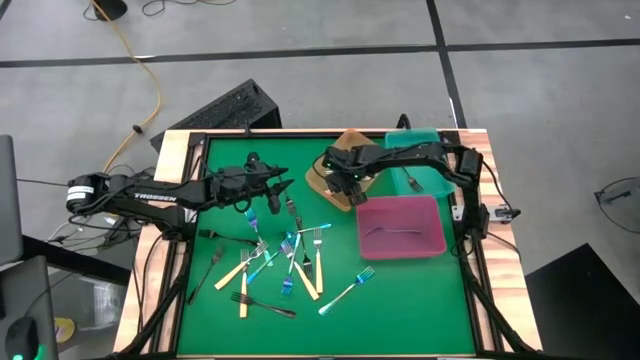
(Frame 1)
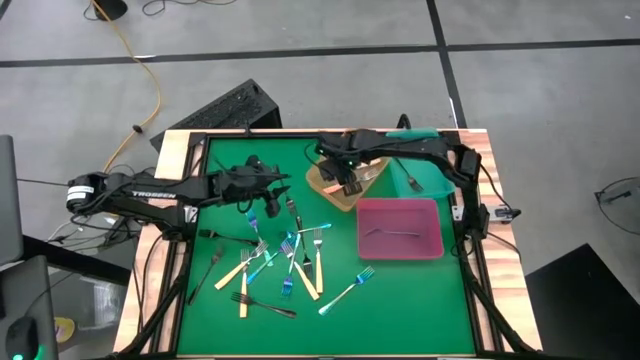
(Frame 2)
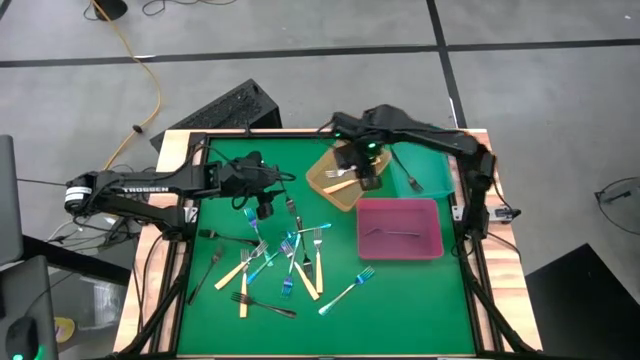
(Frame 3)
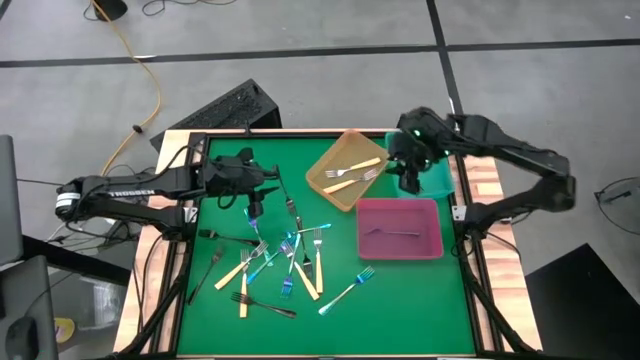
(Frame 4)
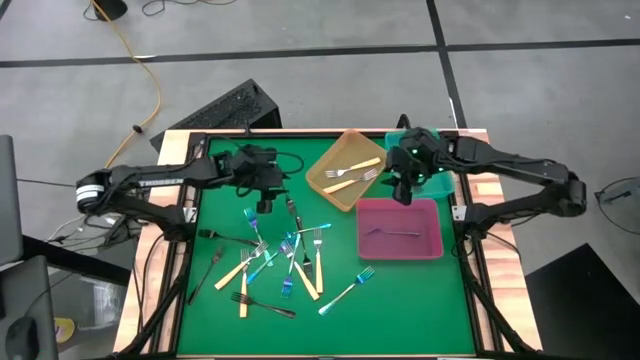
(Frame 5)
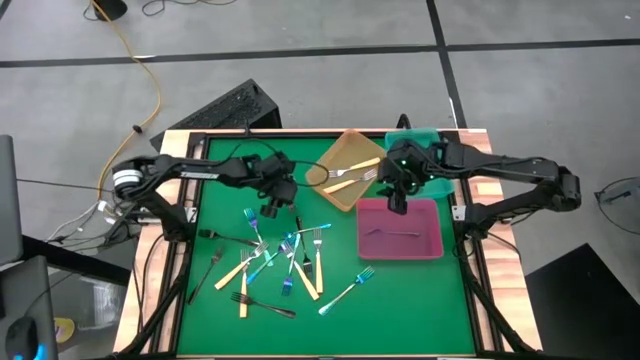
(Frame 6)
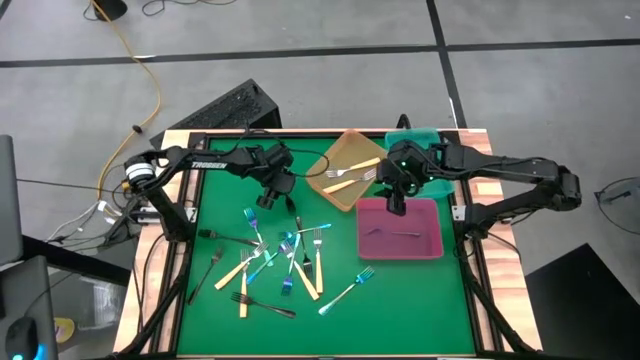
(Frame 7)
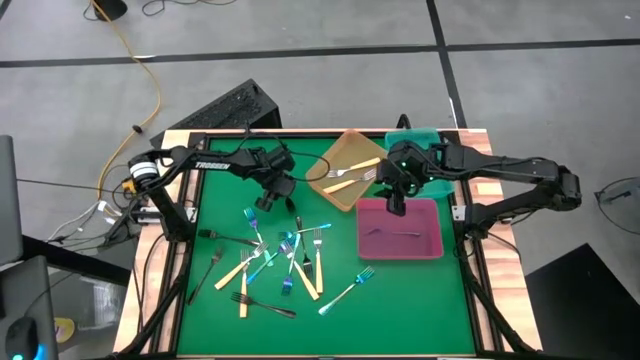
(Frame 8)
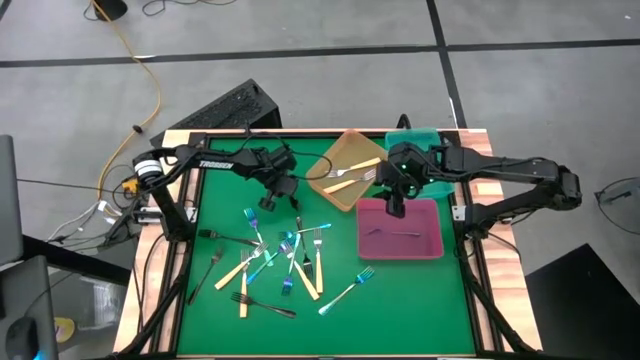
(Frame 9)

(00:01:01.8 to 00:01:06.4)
Task: Sort silverware by color (type)
Put the black fork into the blue bin

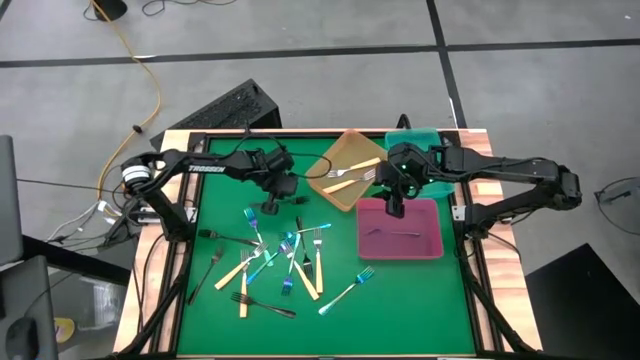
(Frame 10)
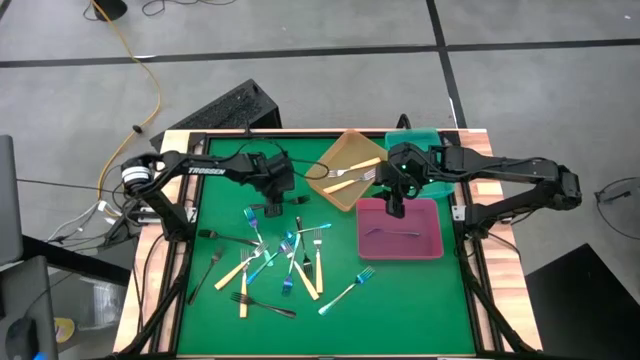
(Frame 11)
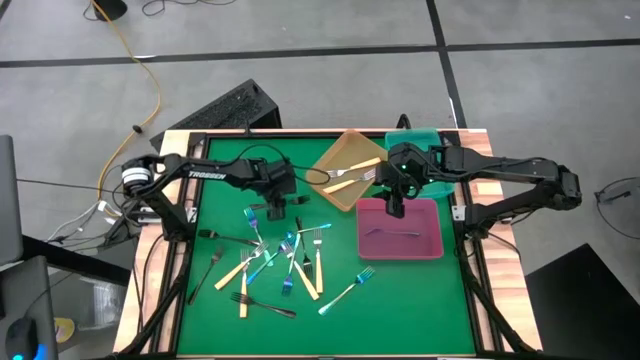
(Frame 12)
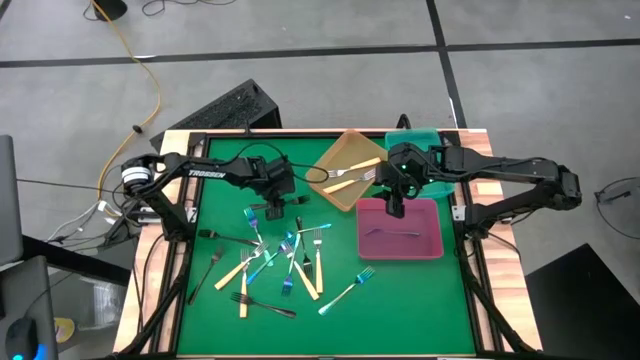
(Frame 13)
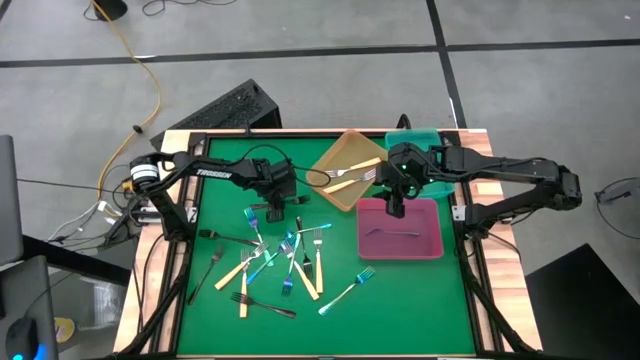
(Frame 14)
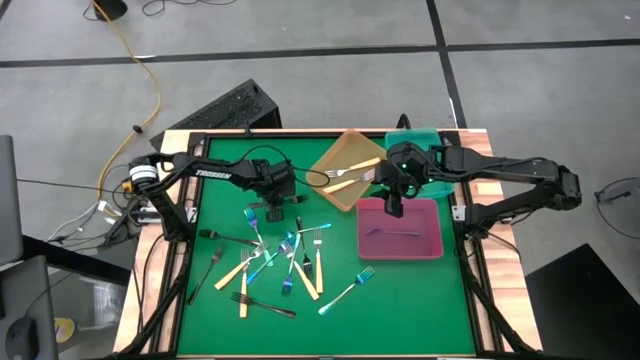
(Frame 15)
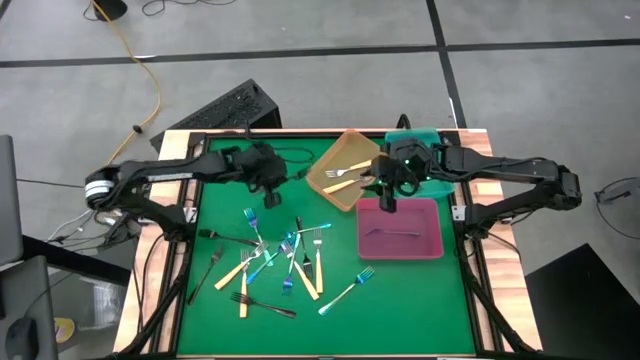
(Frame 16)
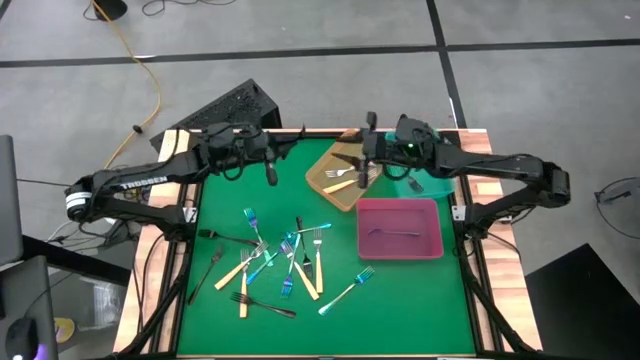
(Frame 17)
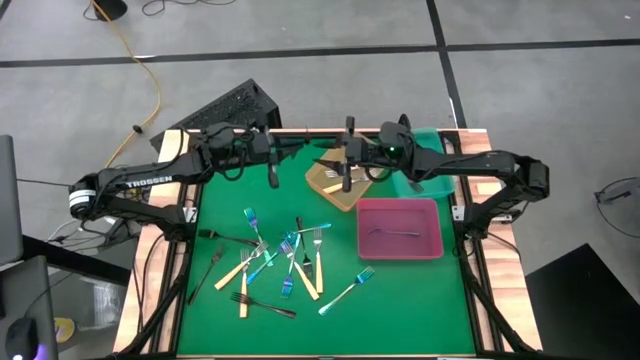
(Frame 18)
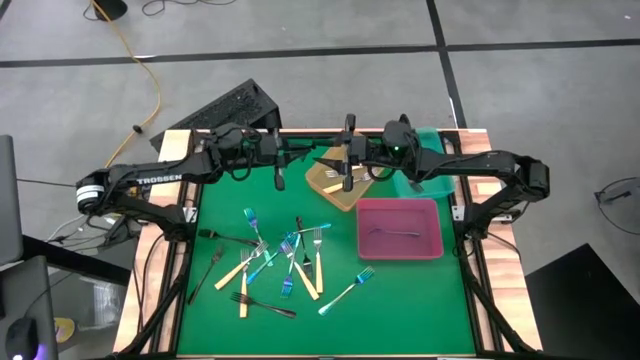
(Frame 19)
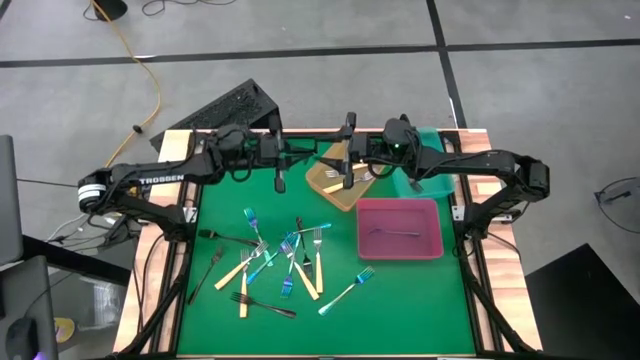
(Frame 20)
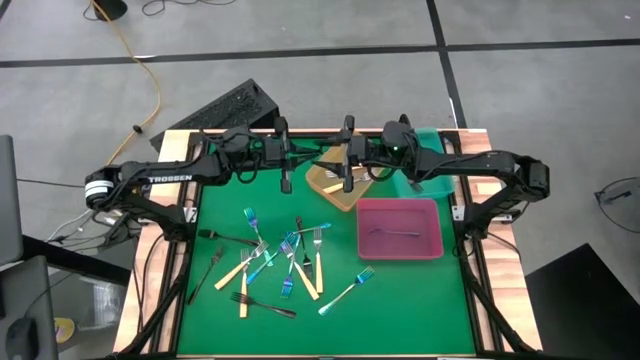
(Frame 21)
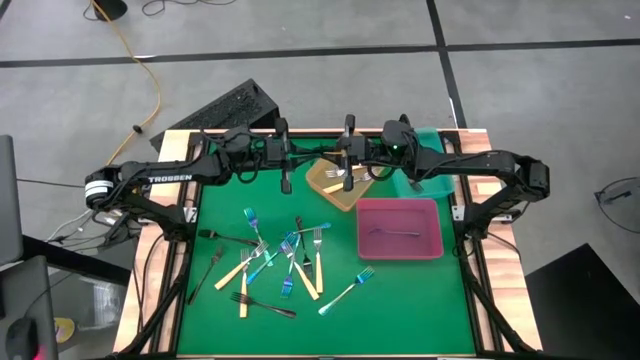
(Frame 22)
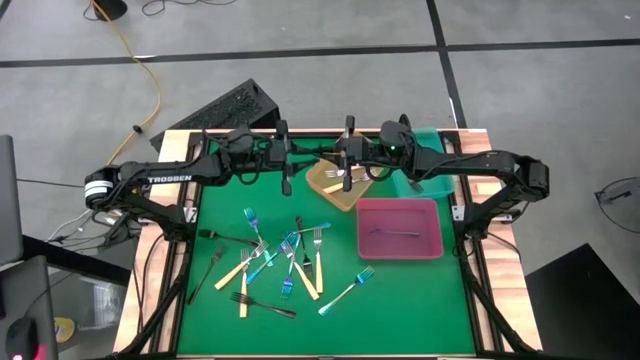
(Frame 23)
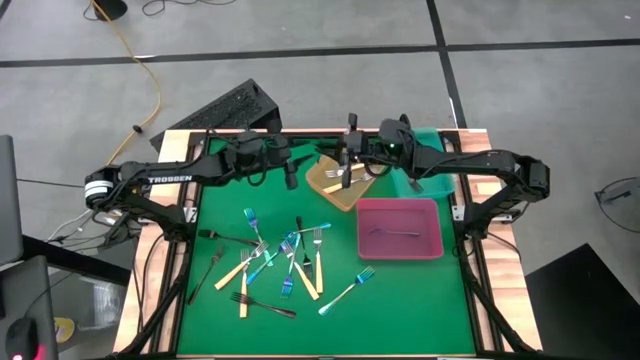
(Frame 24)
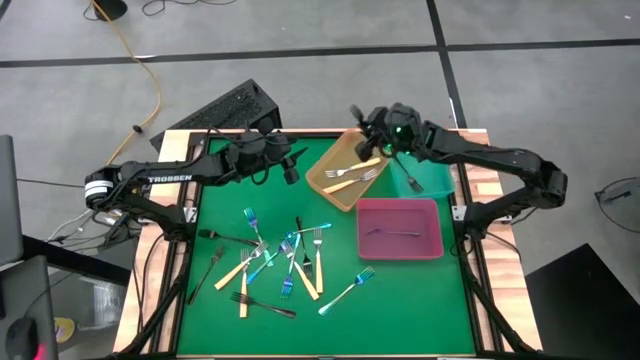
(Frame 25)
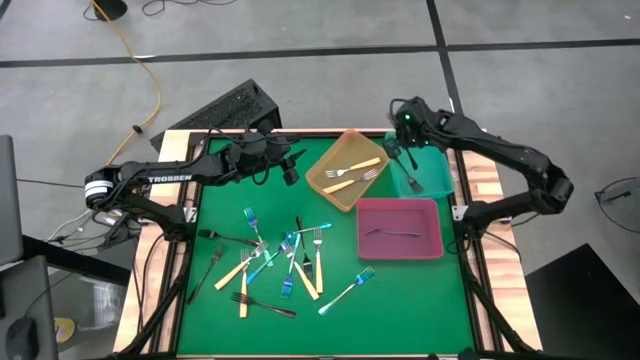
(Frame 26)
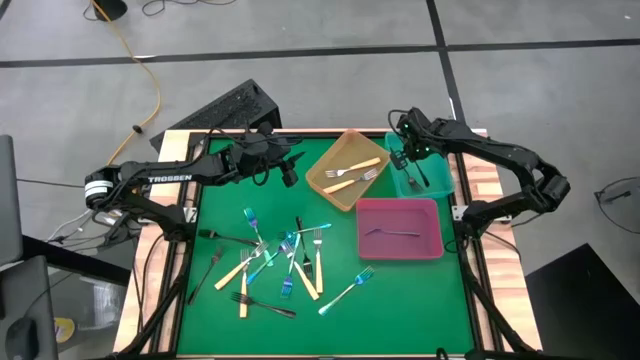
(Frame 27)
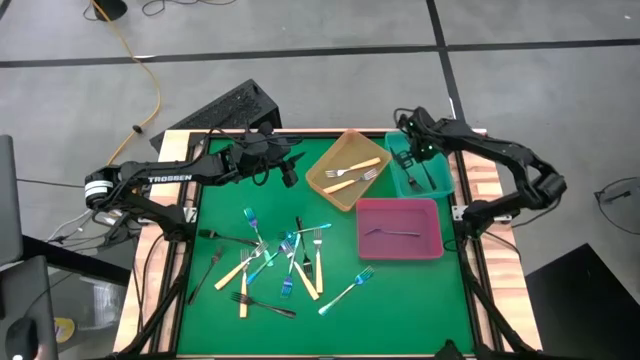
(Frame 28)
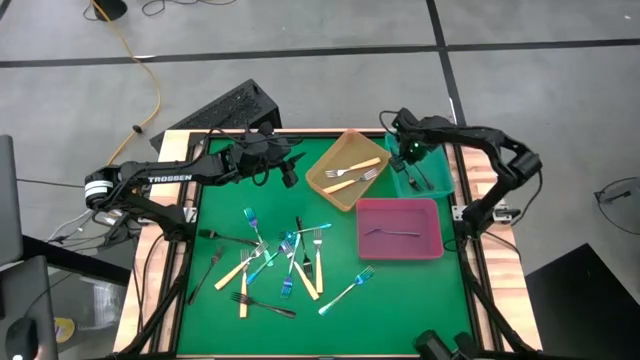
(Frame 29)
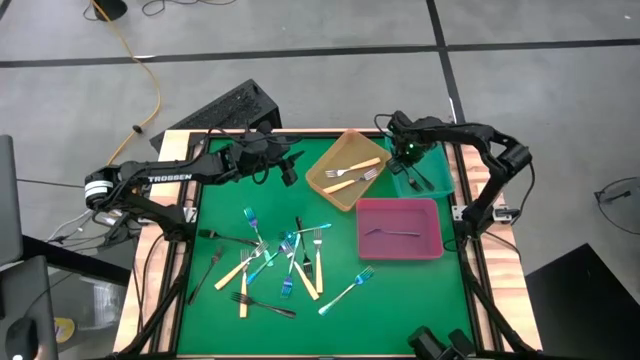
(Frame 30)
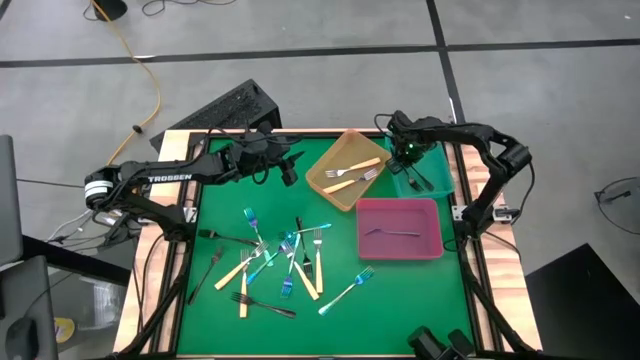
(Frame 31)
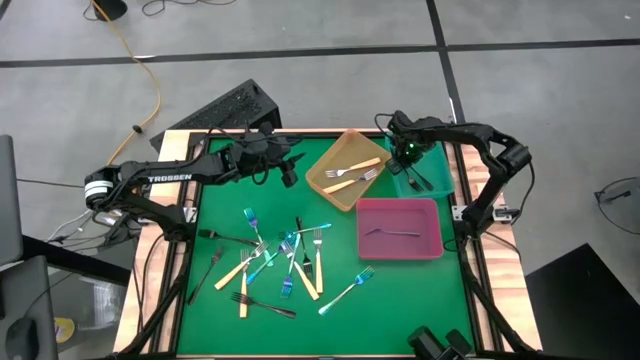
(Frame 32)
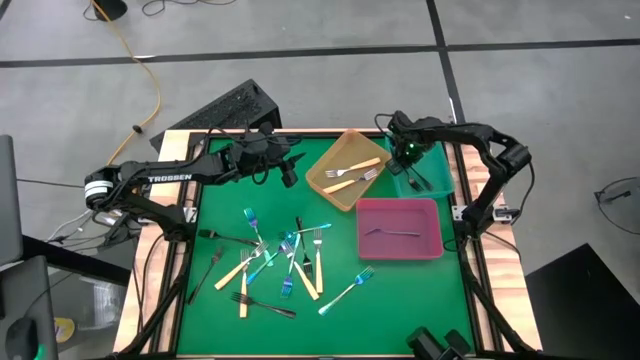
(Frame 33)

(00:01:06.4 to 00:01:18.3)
Put the black fork into the blue bin

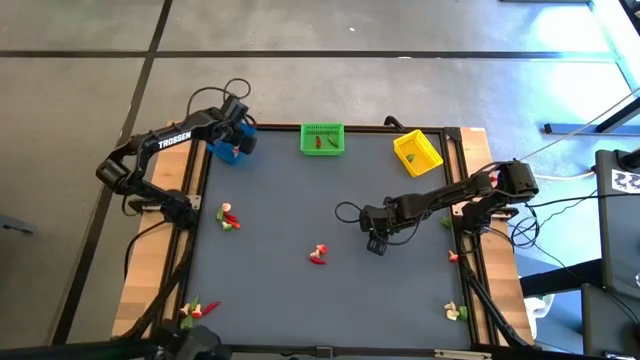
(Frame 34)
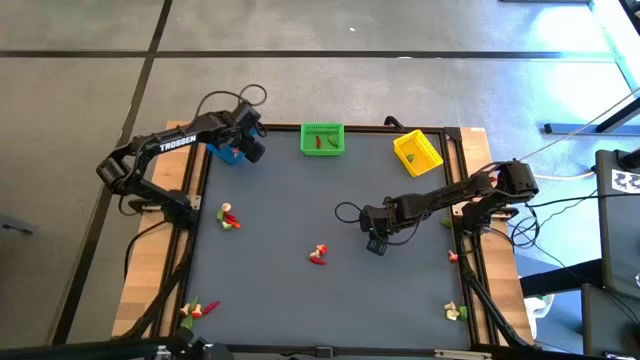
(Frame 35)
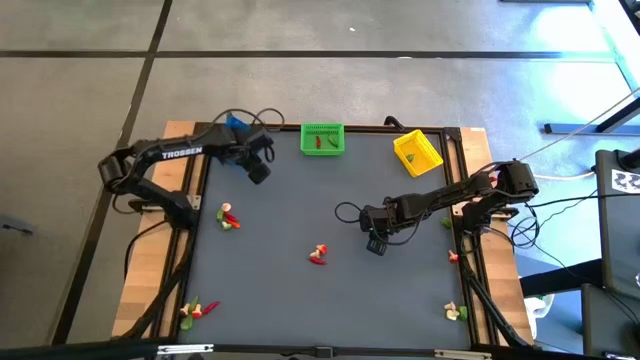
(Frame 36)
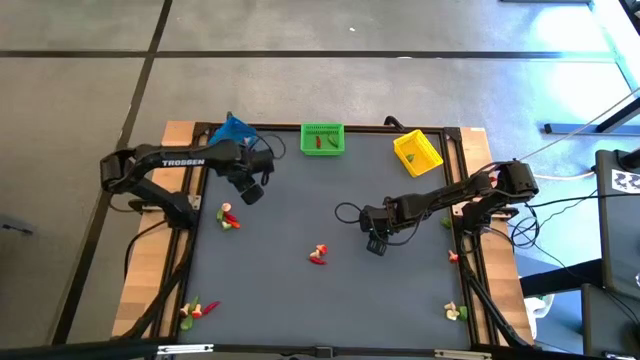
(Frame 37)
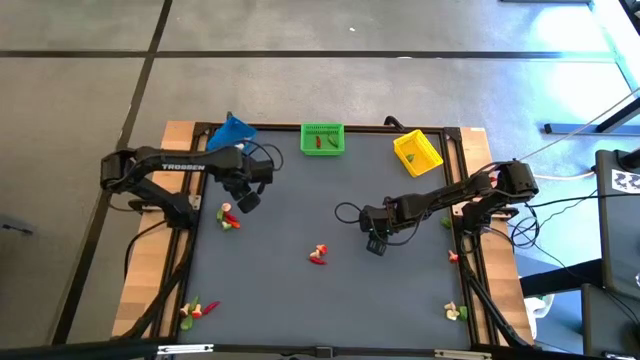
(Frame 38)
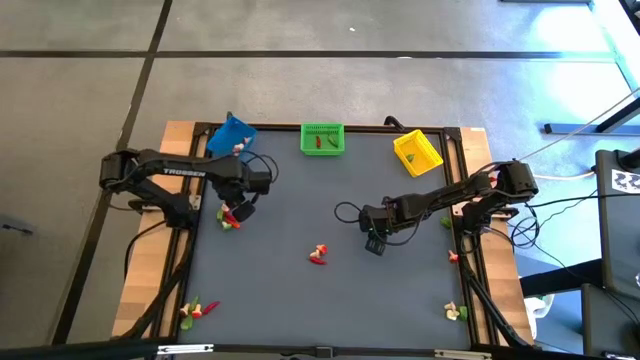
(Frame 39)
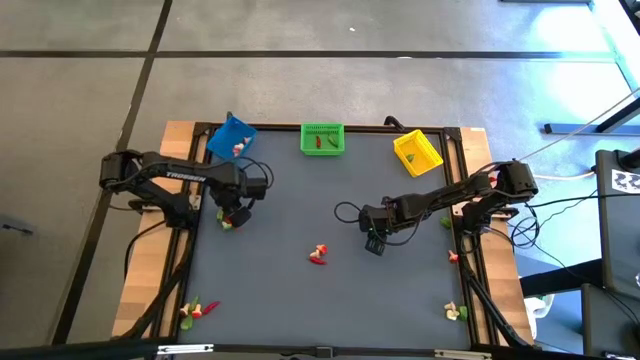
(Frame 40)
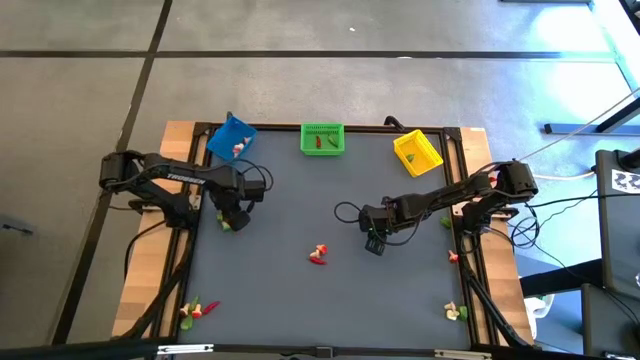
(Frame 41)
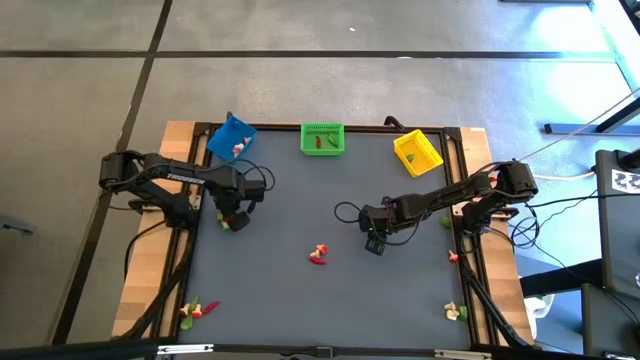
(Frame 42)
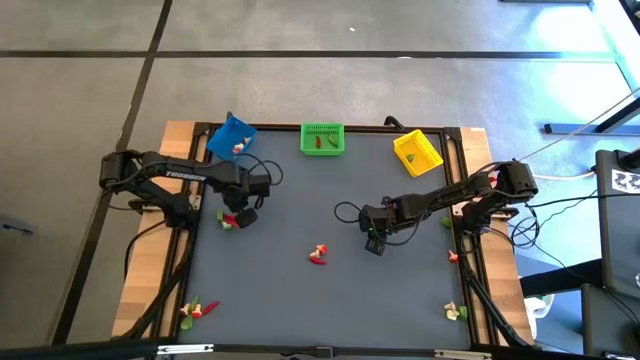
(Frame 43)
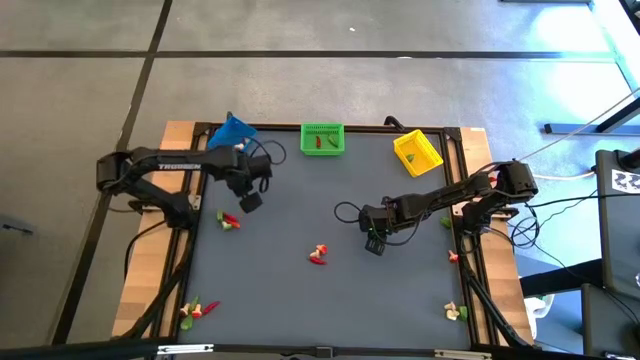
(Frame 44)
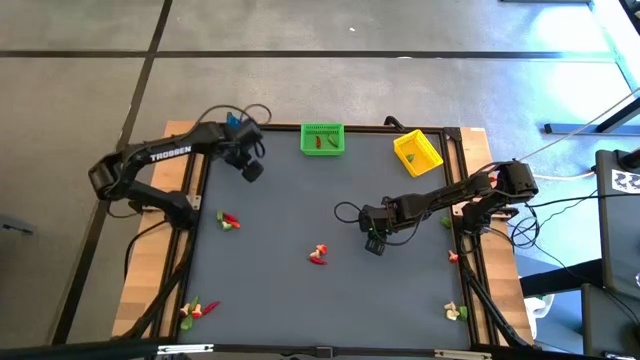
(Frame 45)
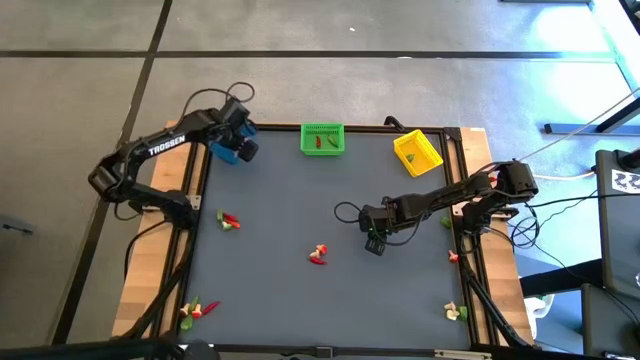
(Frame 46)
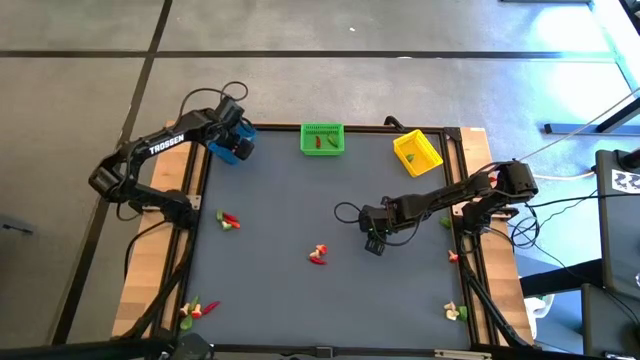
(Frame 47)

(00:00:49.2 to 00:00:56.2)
Task: Sort produce into baskets
Put the brown mushroom into the blue bin
